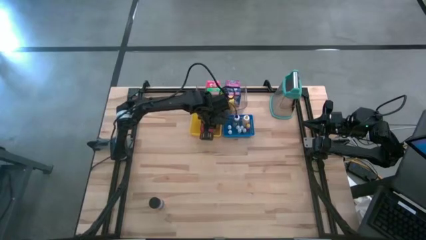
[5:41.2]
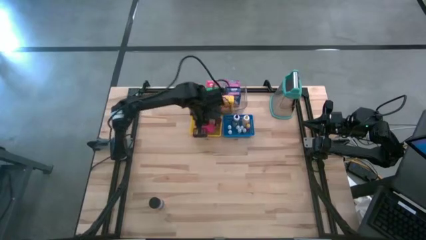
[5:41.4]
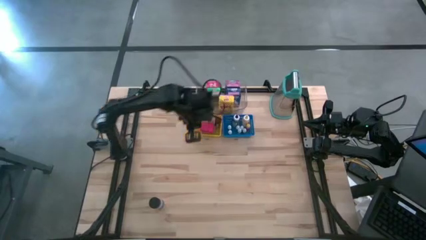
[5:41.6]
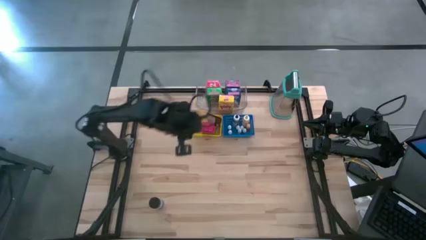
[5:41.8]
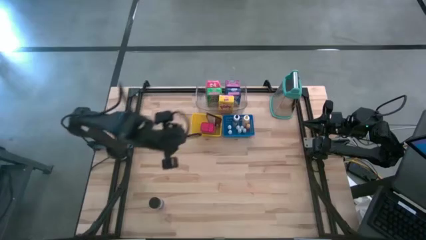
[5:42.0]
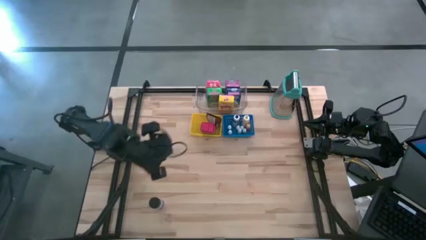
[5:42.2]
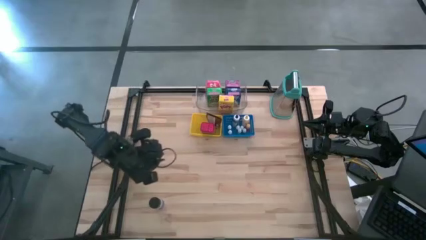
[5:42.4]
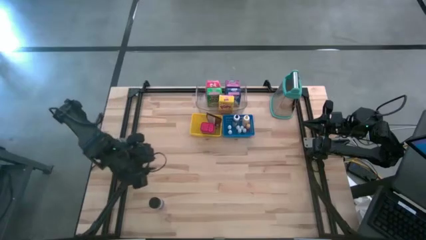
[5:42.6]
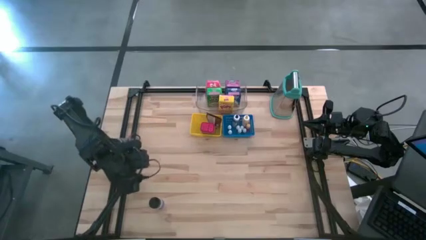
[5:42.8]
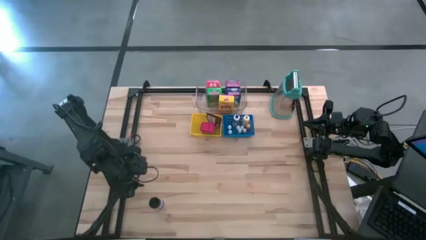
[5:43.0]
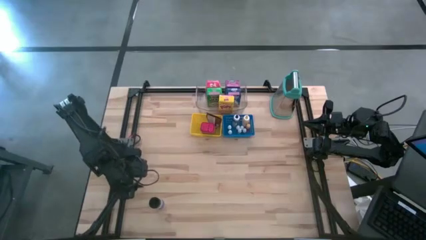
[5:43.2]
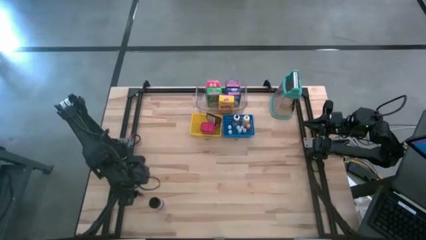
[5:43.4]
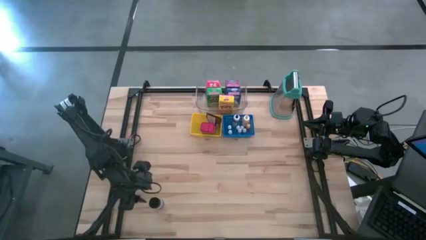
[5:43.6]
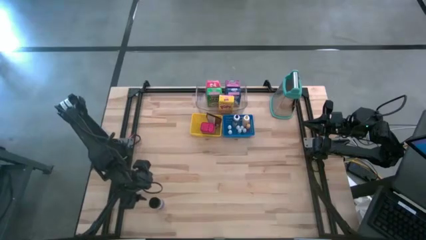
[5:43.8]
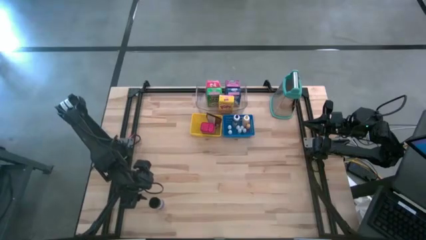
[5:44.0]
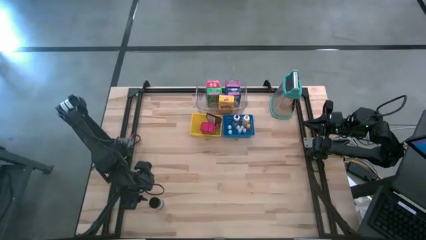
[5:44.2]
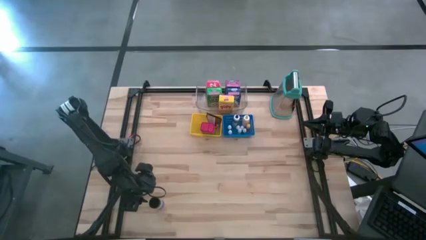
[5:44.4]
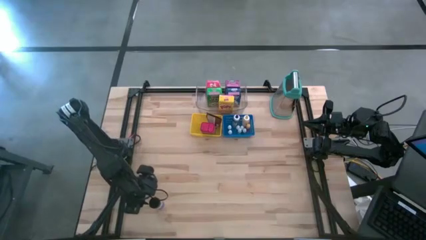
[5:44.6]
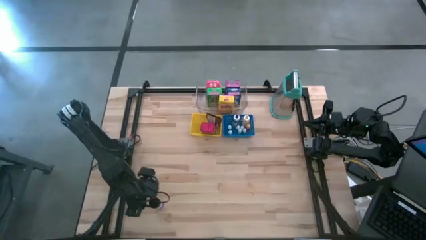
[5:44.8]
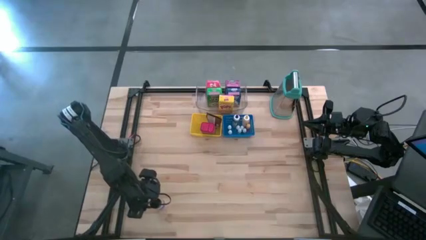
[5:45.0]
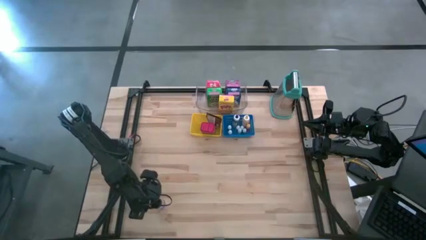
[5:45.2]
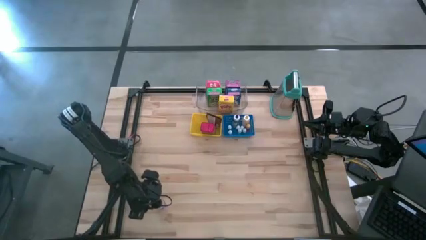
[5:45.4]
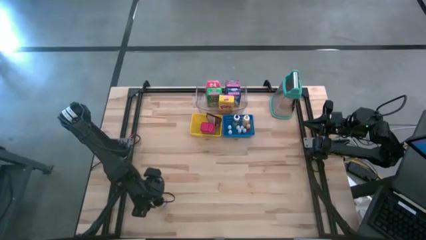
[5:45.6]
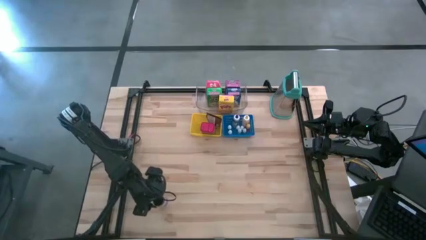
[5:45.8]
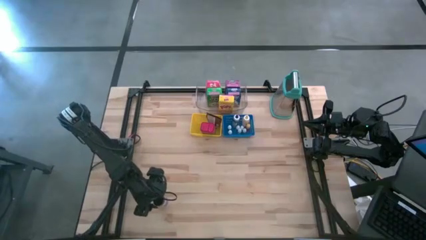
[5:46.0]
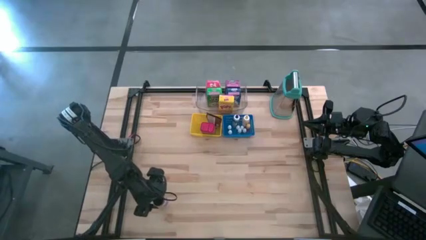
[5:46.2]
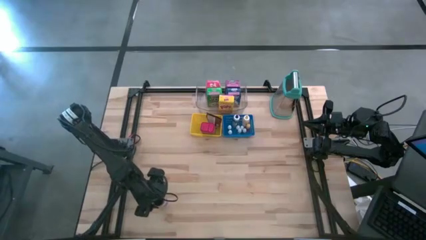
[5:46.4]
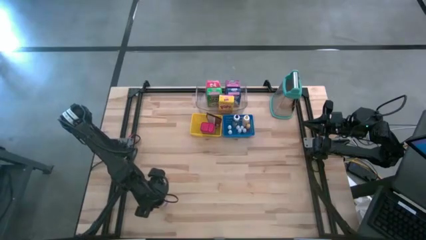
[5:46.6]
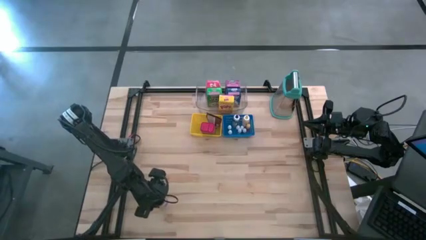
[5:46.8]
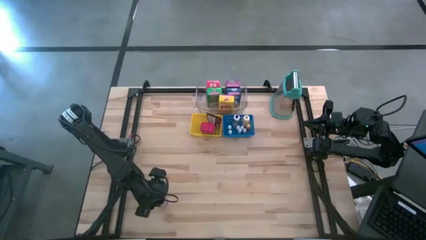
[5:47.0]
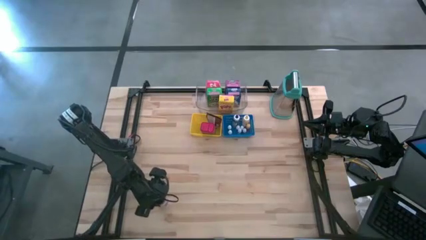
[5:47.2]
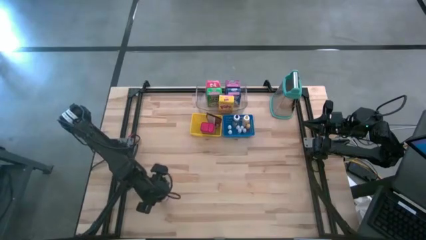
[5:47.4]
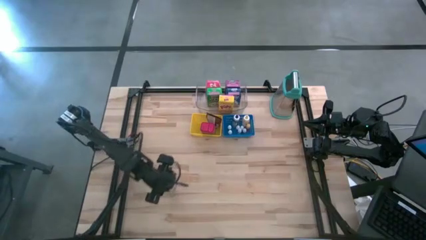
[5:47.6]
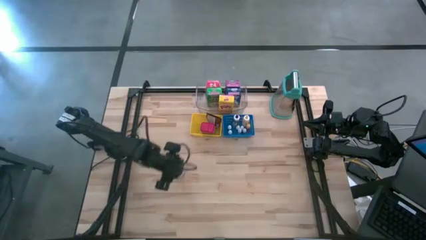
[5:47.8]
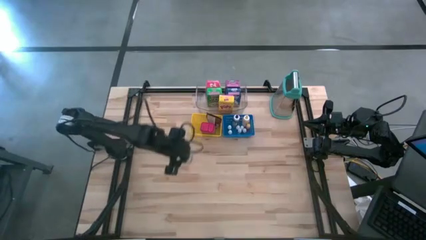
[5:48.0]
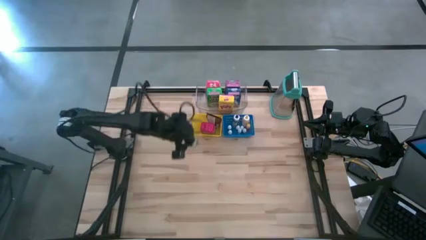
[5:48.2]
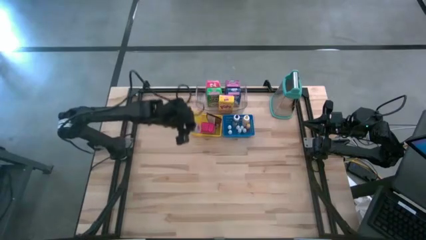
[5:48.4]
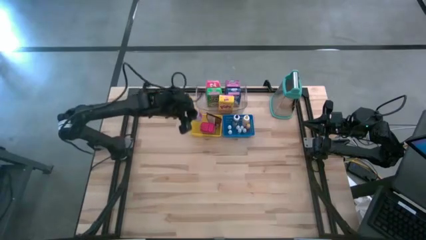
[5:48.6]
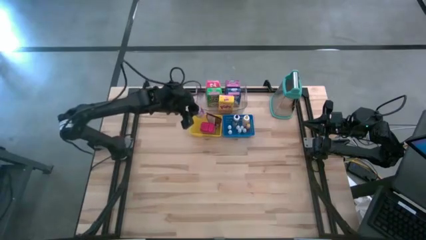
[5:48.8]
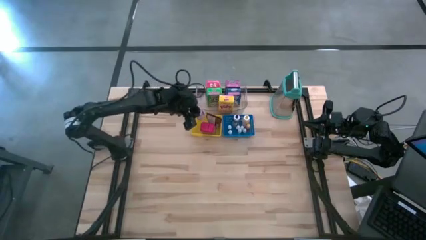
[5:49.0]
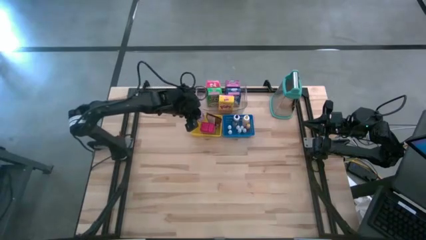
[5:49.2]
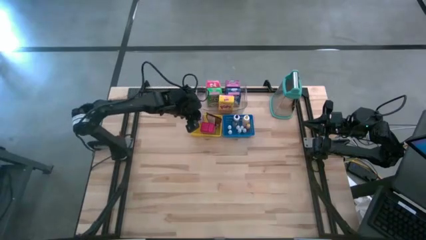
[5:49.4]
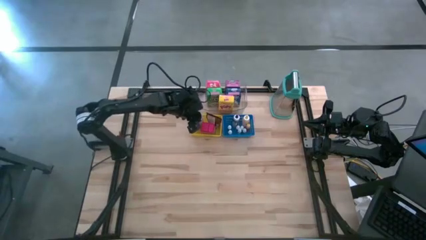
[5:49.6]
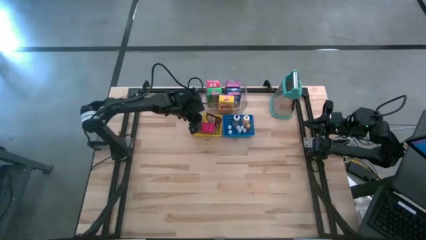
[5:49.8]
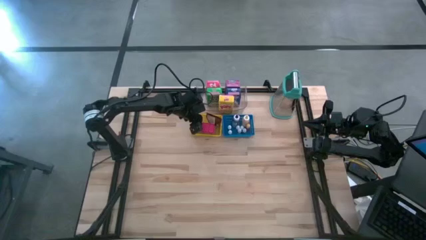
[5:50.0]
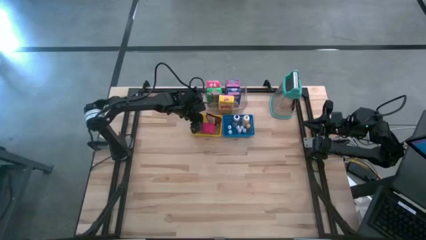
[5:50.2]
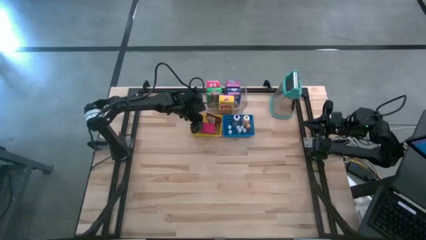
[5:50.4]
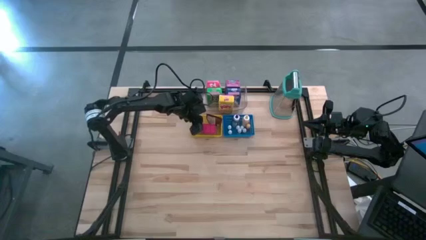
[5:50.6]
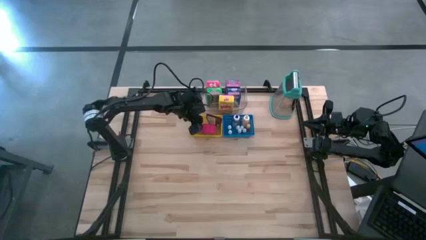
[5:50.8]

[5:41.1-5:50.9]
Task: Pick & Place Kitchen Items
Put the violet seasoning bottle into the yellow bin

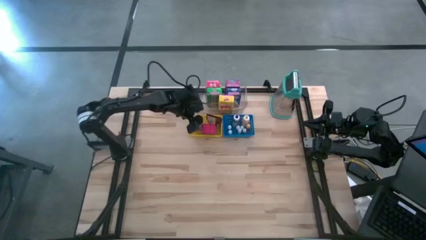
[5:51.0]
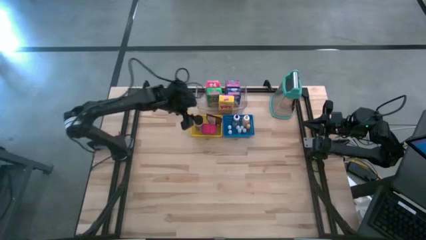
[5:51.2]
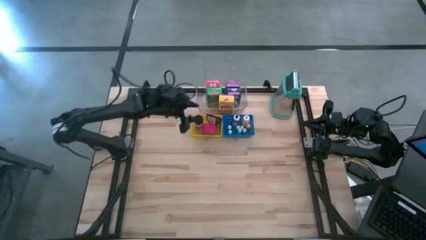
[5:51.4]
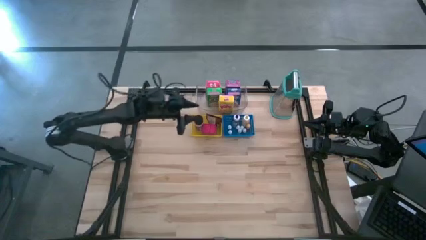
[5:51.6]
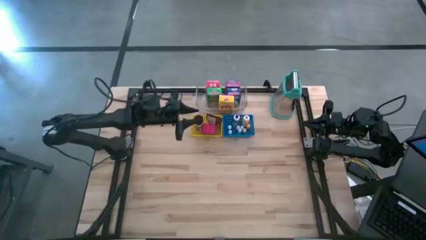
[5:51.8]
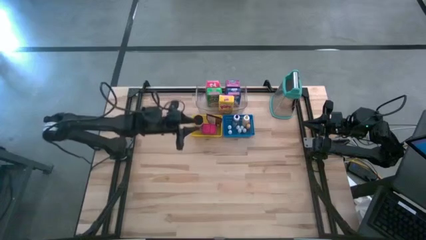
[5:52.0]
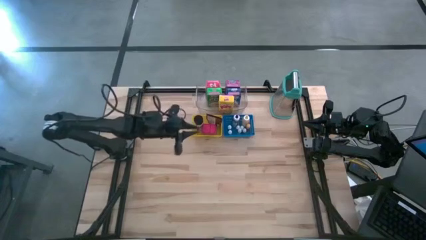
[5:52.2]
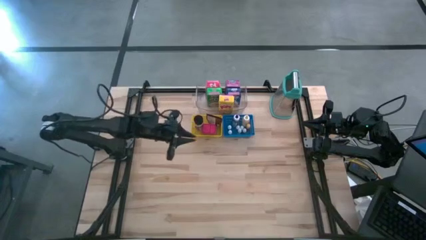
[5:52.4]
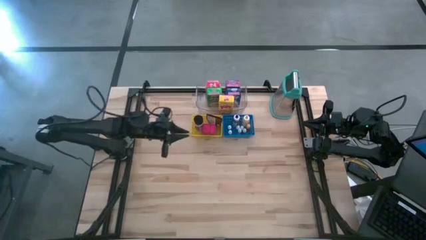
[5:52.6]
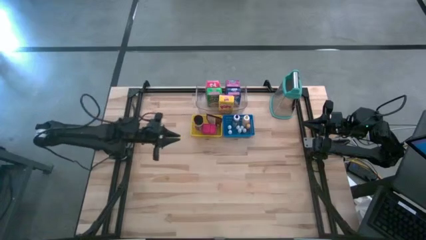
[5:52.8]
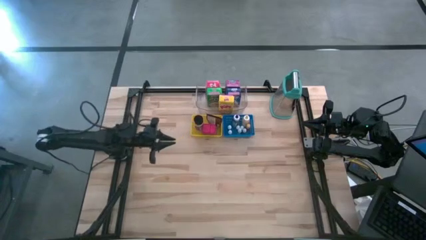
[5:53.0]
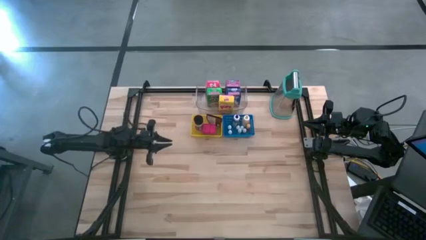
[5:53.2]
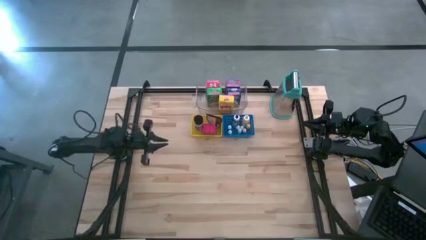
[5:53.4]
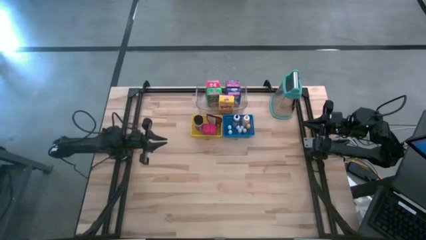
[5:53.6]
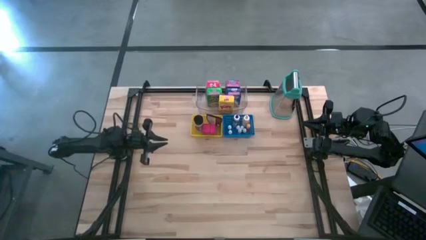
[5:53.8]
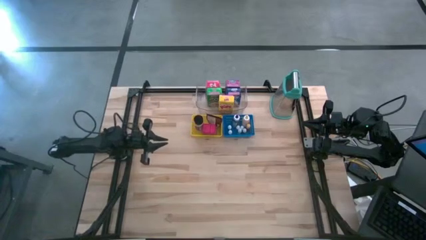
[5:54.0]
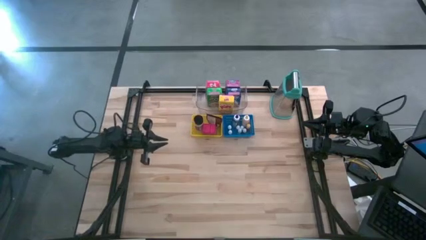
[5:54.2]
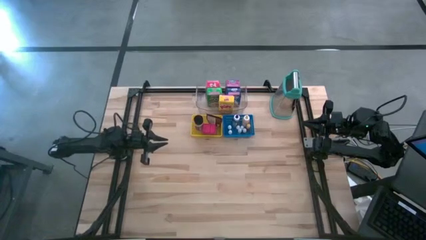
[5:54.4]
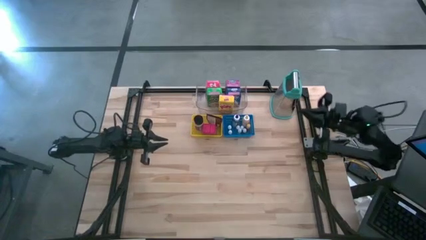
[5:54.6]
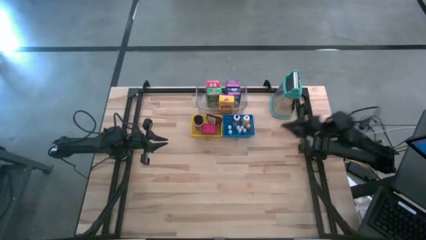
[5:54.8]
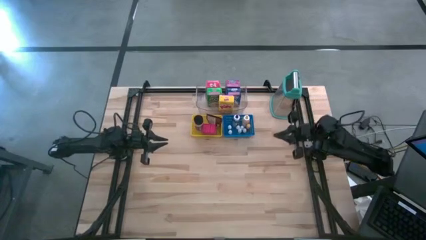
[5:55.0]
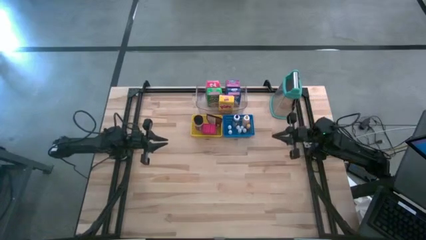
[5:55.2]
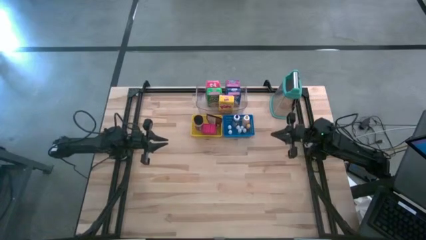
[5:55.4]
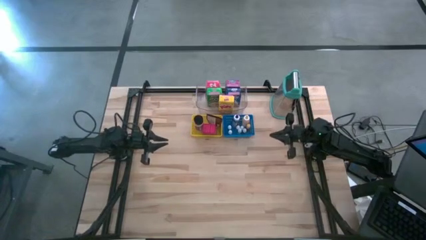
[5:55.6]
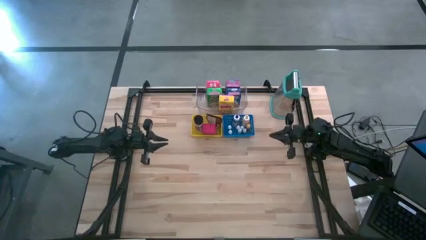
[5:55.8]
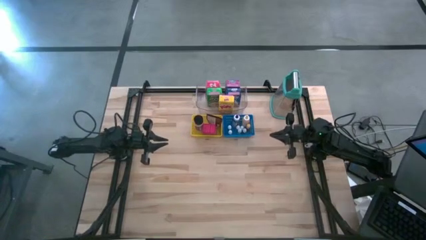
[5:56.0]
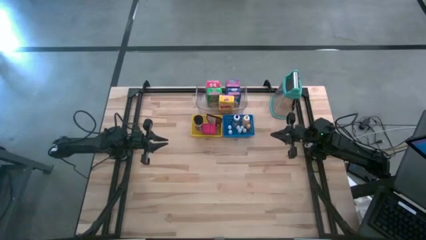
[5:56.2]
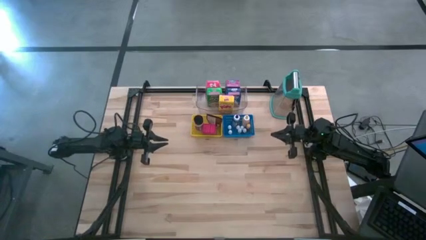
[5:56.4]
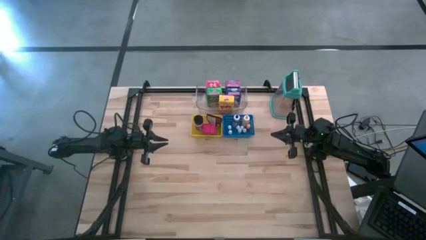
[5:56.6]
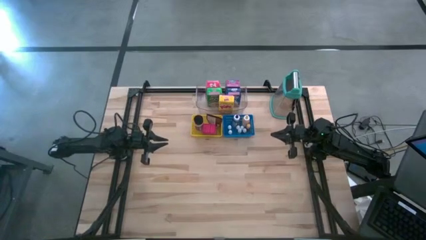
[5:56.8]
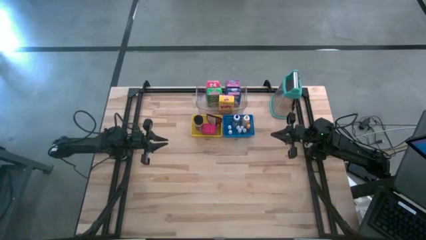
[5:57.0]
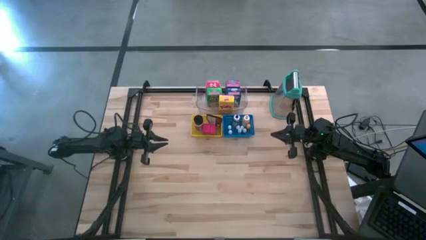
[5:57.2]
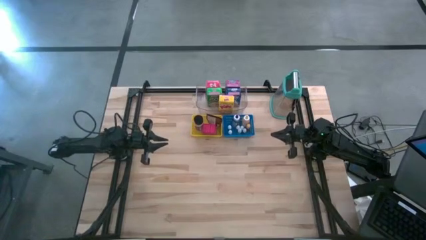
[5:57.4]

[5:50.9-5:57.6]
Return to Home Position
